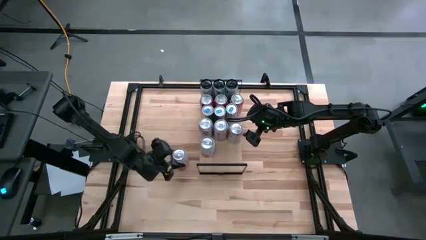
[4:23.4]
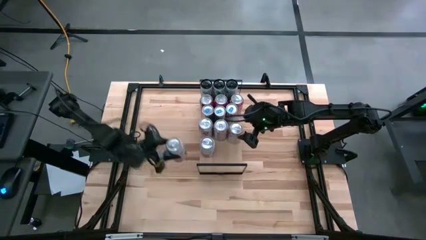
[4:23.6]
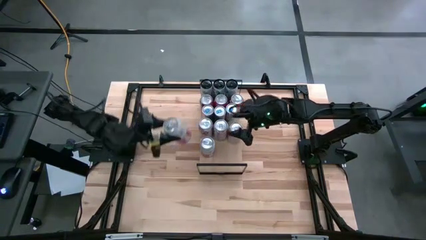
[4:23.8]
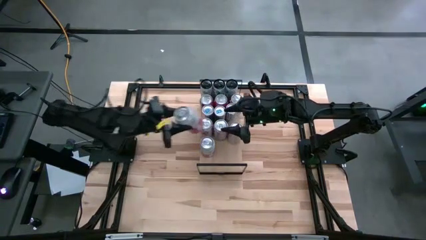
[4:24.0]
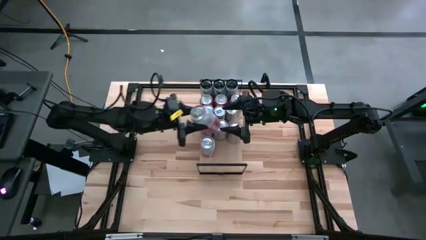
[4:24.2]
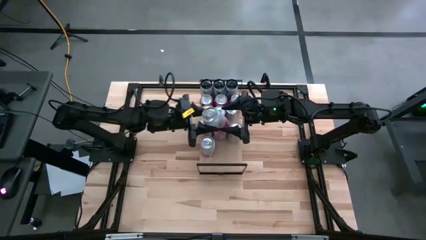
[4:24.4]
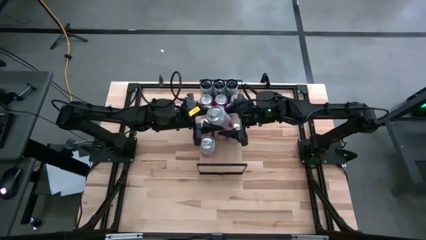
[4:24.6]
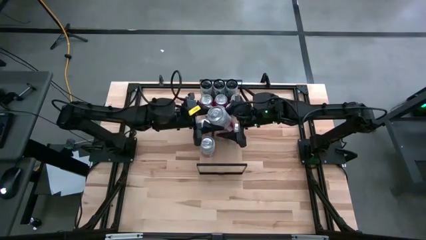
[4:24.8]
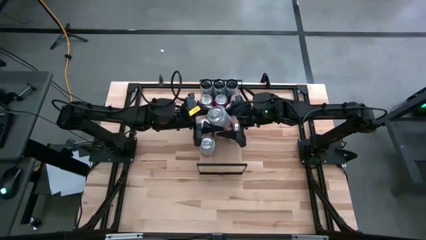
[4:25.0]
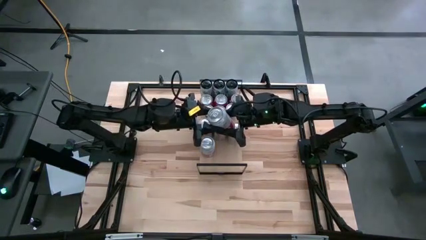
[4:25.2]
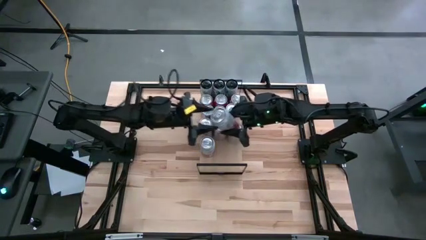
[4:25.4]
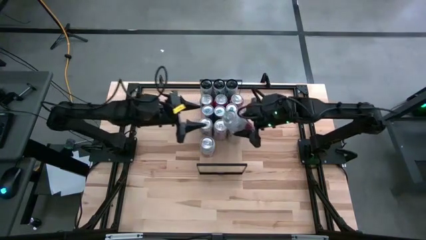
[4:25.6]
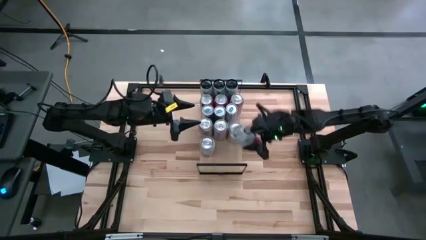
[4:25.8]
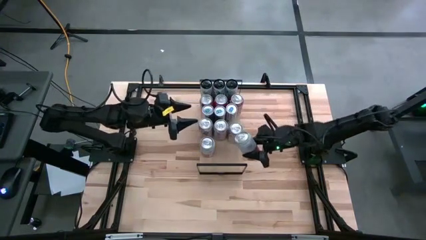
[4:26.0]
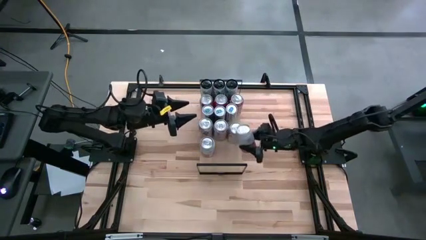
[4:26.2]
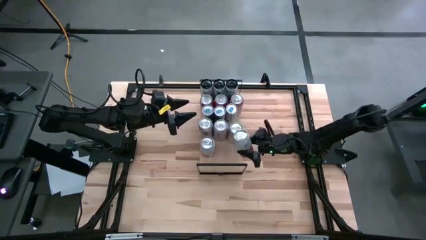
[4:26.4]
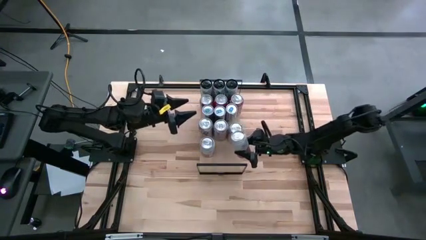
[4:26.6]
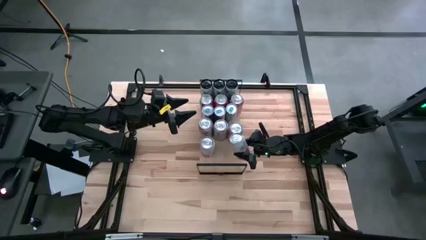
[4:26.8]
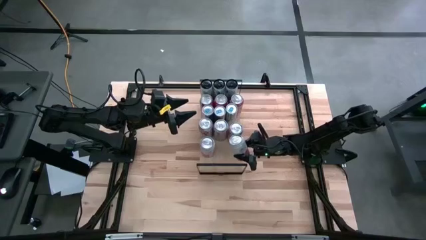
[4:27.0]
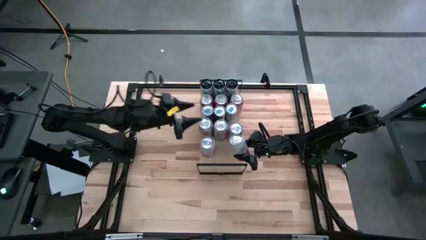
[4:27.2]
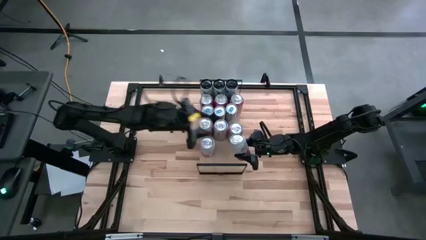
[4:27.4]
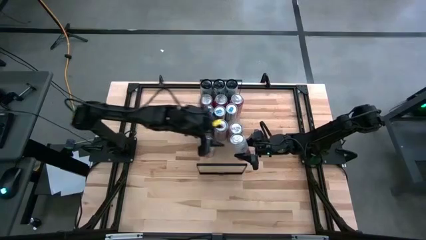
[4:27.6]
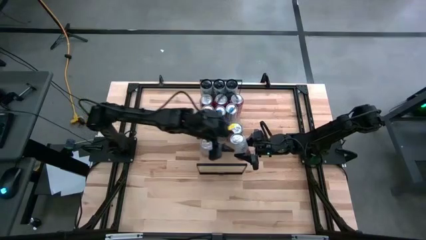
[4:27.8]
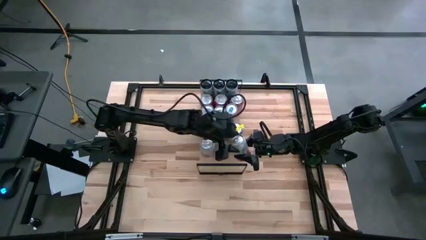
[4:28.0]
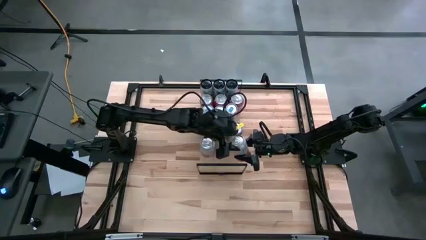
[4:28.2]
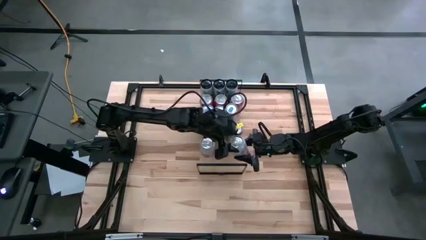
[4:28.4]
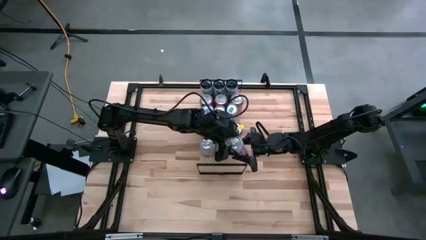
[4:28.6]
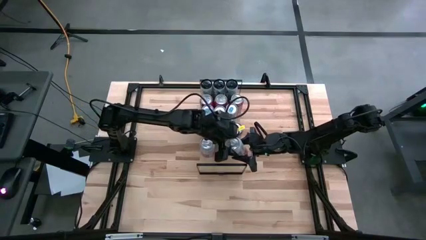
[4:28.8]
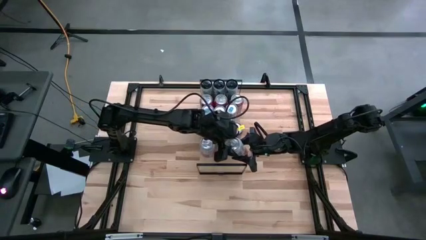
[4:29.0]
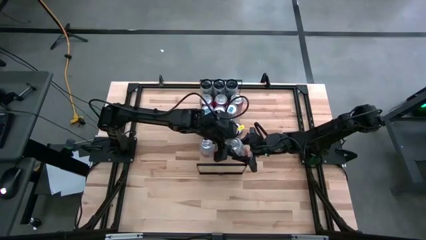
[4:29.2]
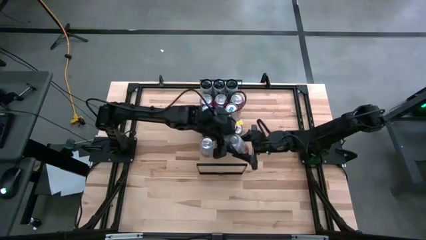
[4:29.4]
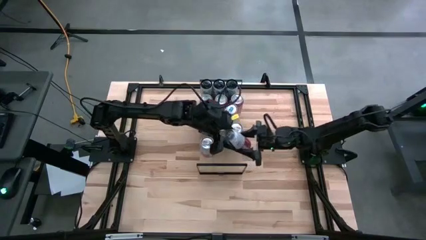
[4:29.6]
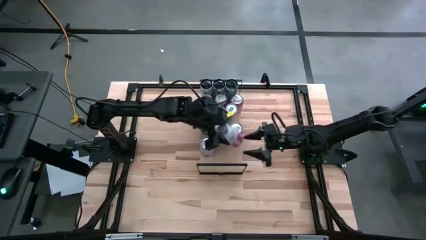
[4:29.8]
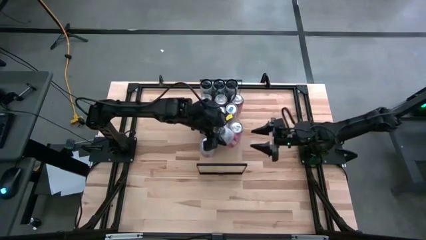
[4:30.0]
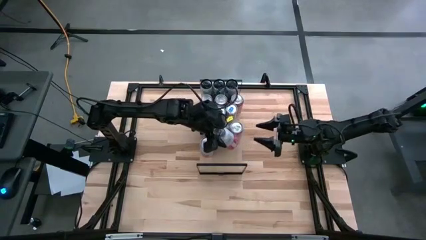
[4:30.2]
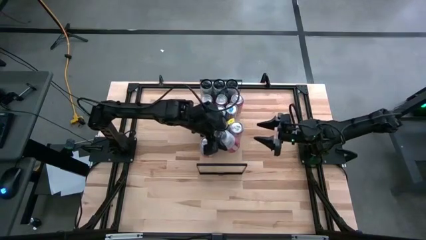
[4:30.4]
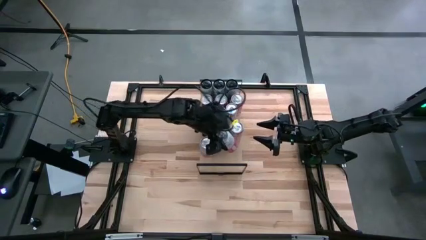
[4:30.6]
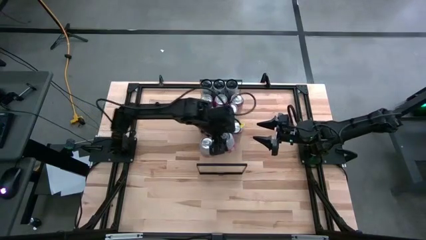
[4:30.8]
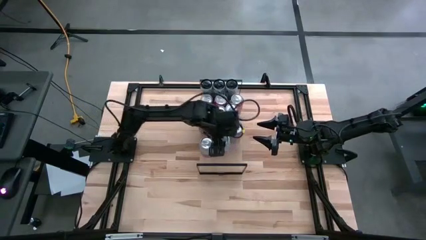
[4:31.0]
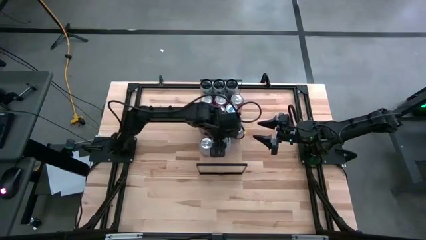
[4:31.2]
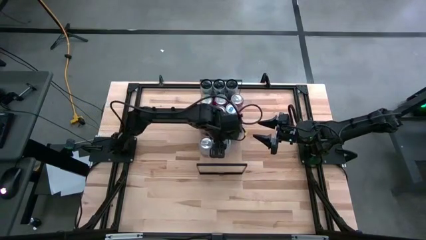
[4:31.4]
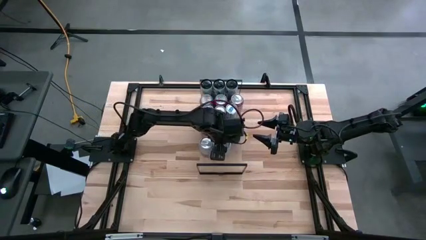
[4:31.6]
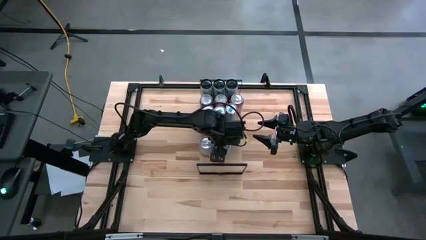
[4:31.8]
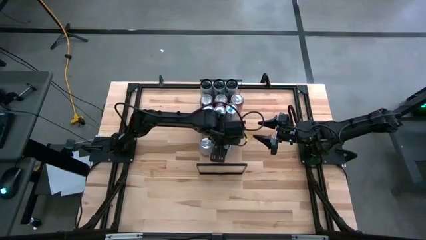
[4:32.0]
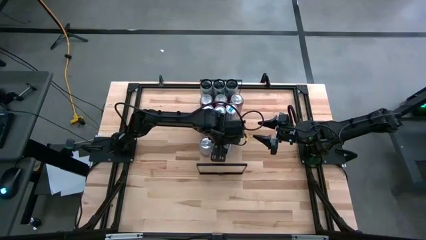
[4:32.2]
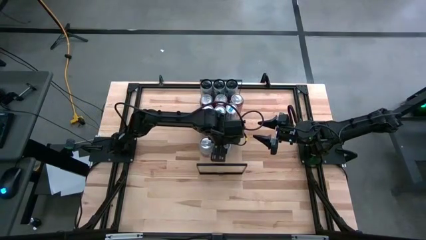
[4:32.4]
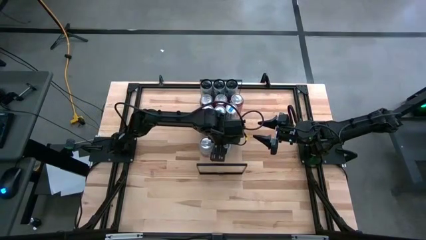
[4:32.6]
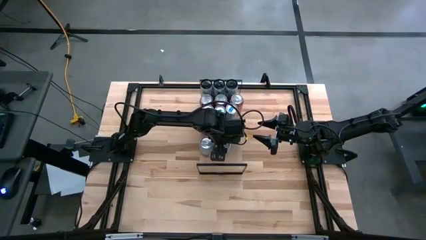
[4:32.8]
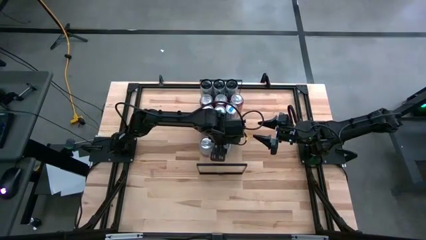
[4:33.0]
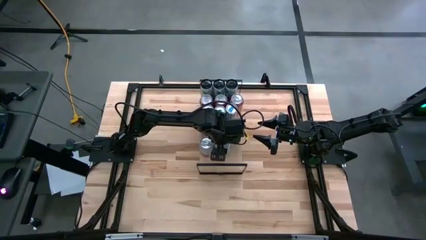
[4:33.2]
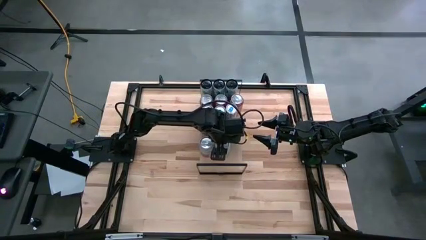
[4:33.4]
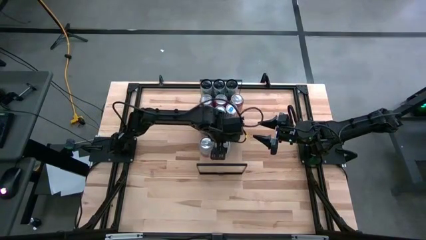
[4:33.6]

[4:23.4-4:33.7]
Task: Place canned beverage on shelf
Put the pink-white soda can on the shelf aligned with the other pink-white soda can

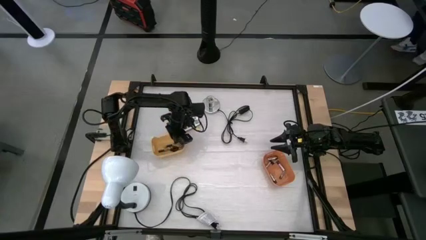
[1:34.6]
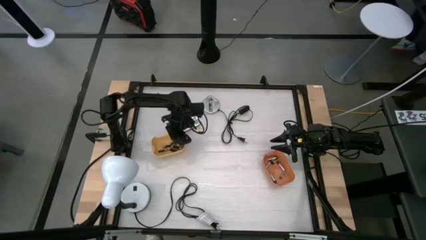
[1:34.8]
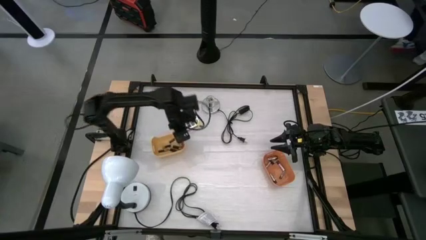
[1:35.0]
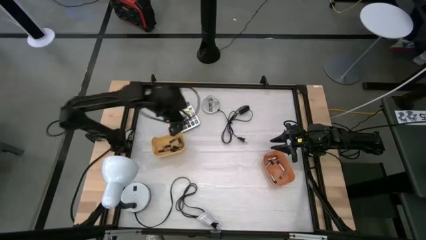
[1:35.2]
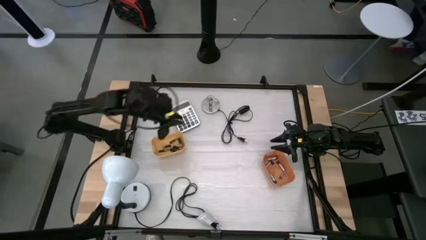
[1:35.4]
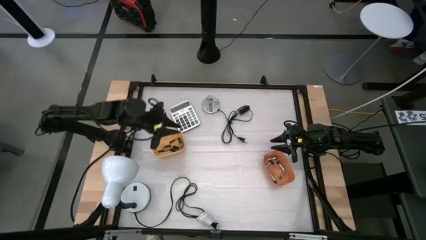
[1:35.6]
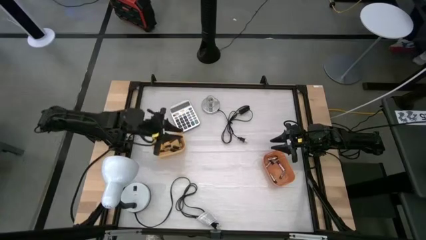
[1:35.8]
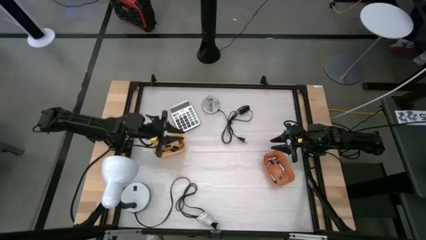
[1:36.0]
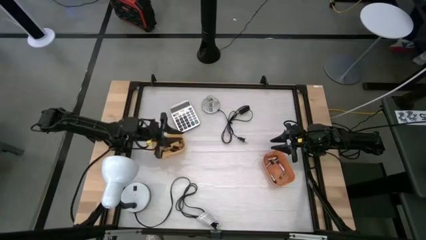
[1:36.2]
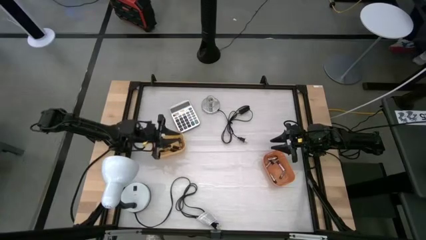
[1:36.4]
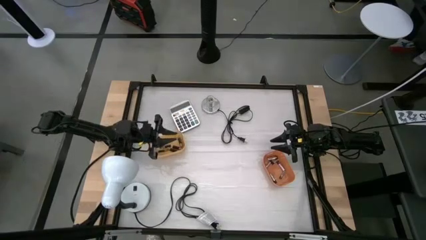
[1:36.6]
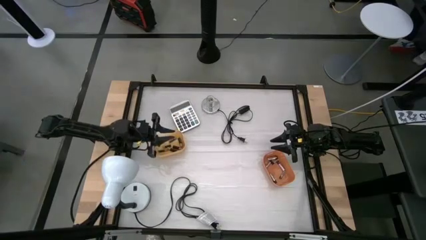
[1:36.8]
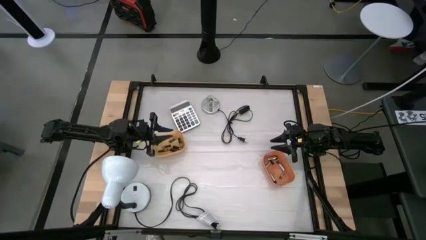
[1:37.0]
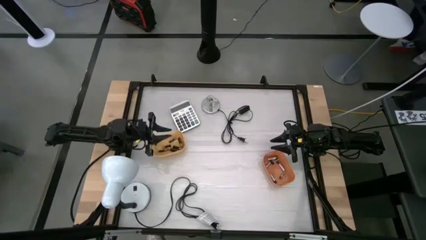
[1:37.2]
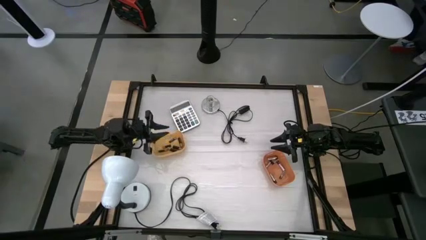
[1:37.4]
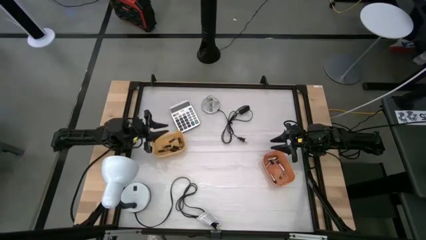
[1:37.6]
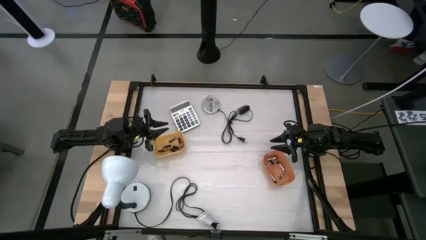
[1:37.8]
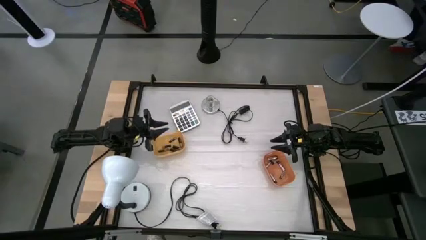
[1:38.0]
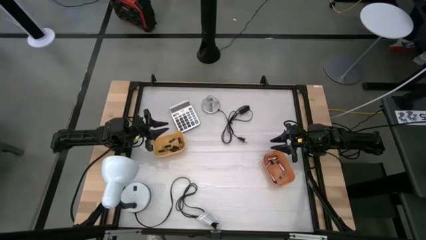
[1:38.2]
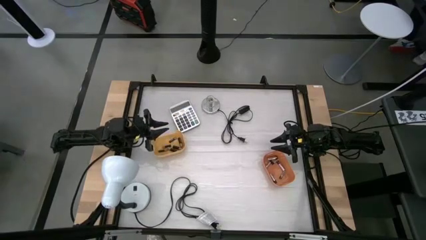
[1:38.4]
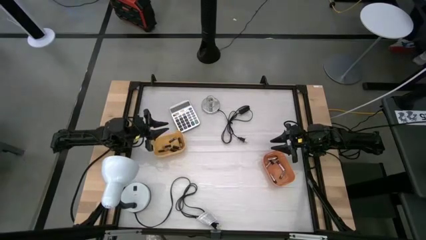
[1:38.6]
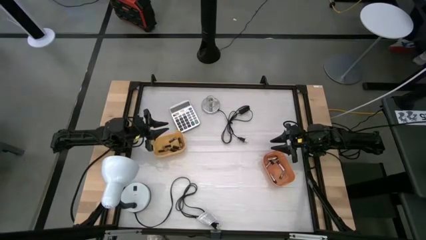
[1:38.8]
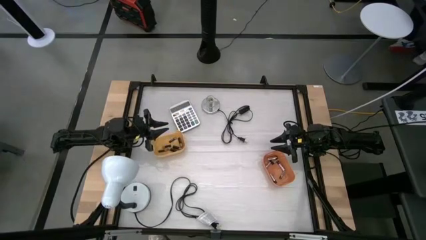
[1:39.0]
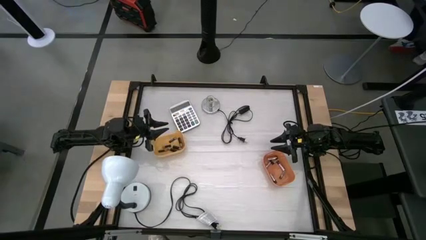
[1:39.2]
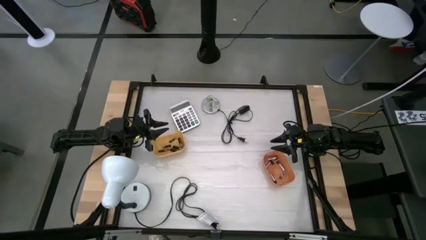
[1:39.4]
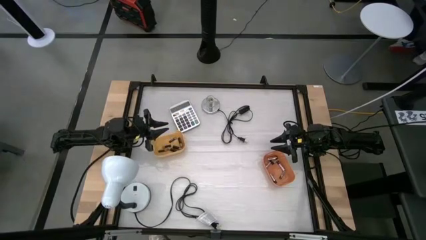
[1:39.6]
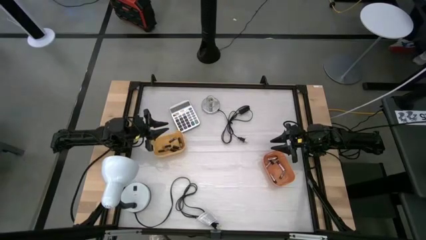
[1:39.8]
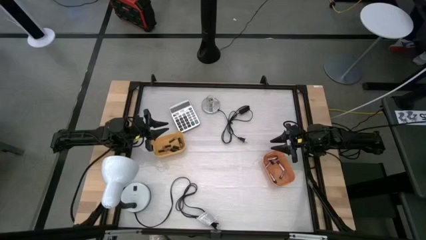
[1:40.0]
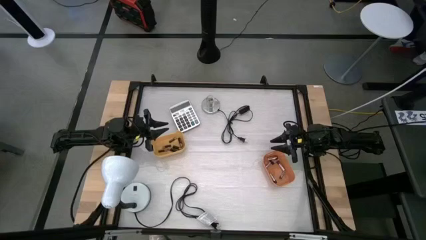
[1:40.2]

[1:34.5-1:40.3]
Task: Sort batteries
Return to Home Position
